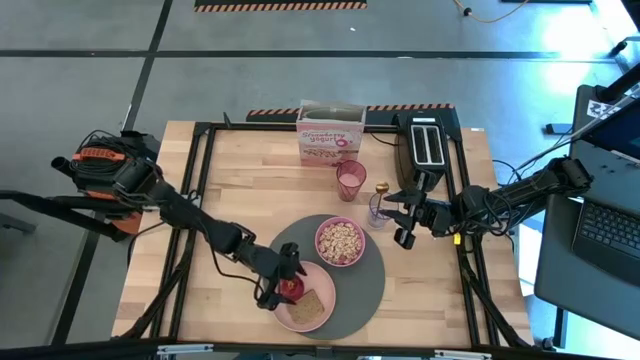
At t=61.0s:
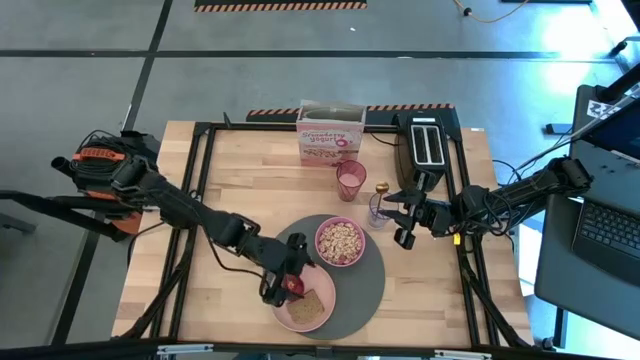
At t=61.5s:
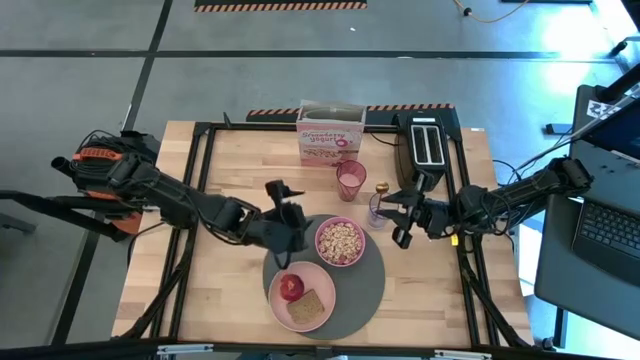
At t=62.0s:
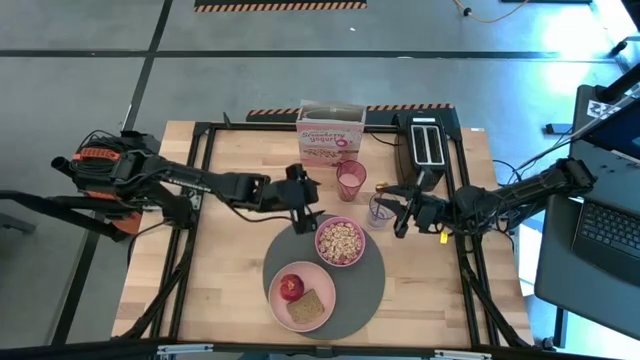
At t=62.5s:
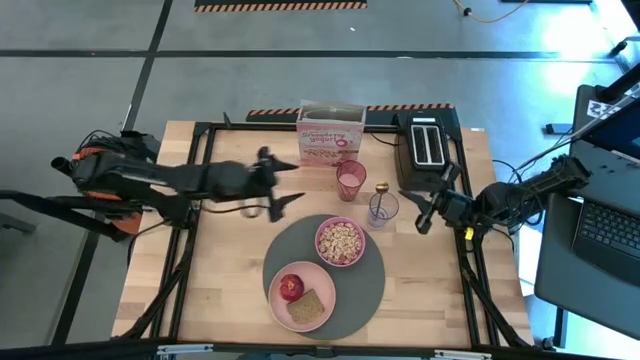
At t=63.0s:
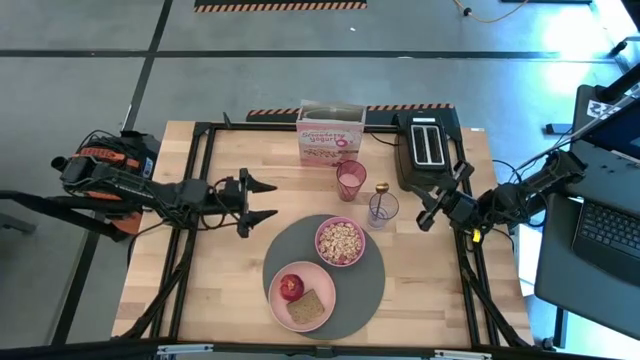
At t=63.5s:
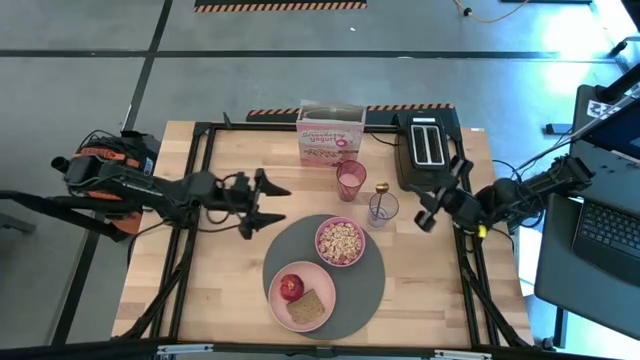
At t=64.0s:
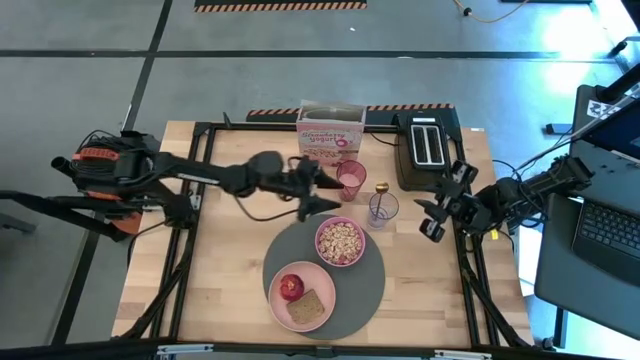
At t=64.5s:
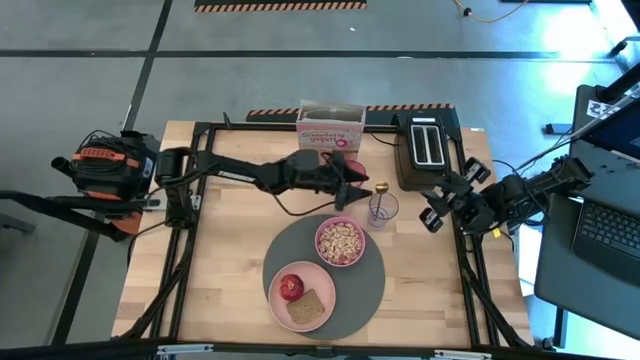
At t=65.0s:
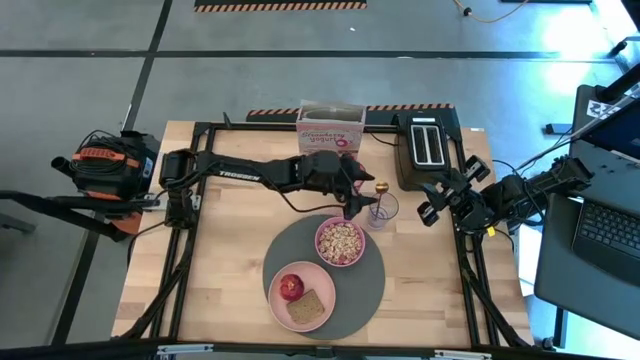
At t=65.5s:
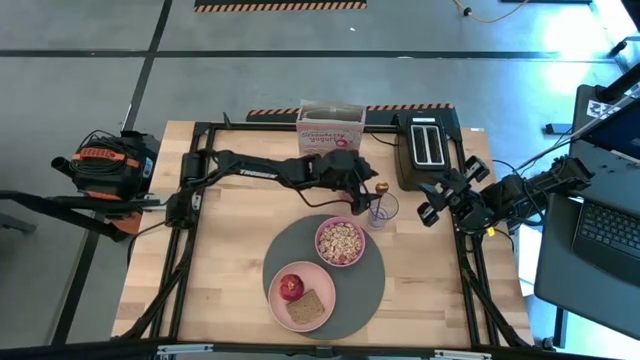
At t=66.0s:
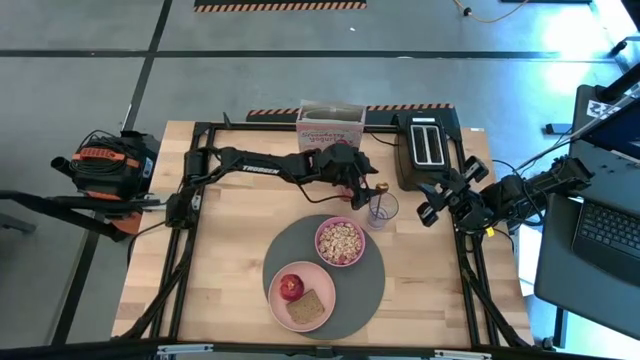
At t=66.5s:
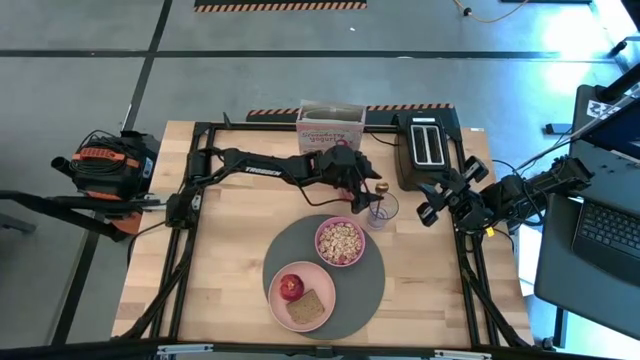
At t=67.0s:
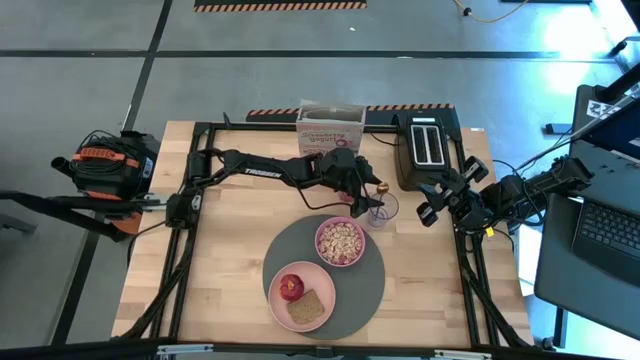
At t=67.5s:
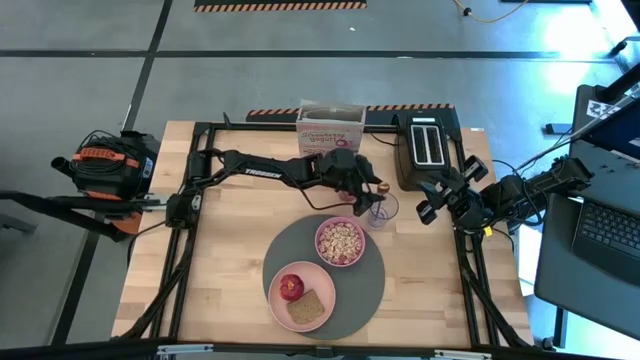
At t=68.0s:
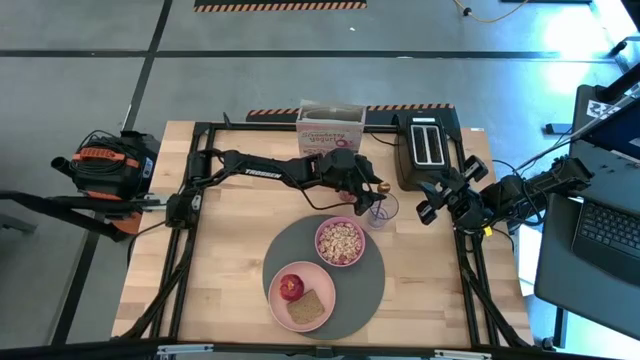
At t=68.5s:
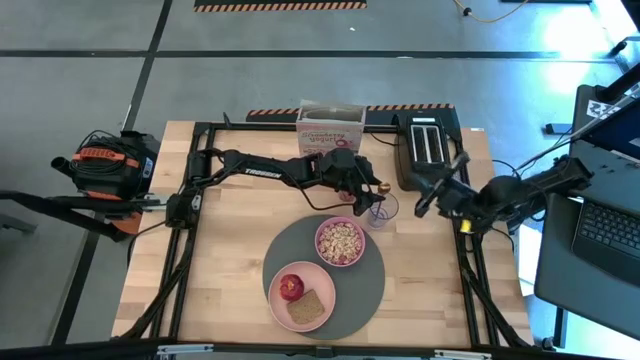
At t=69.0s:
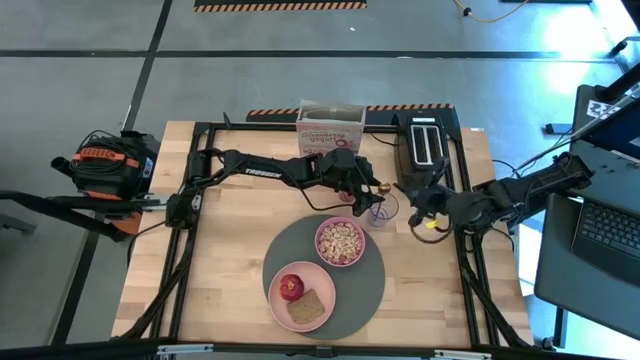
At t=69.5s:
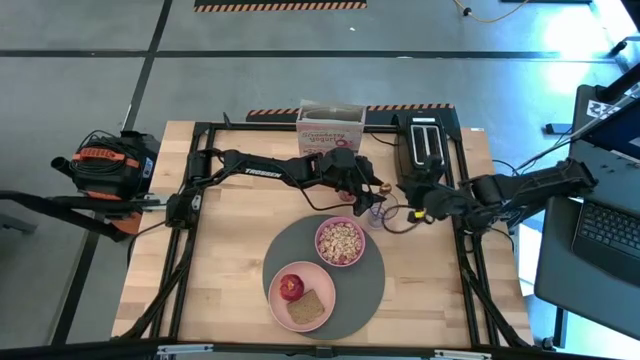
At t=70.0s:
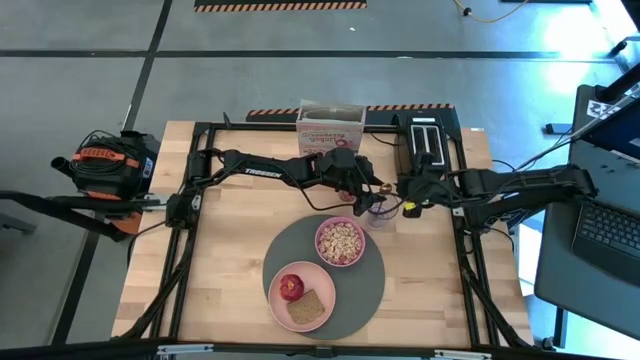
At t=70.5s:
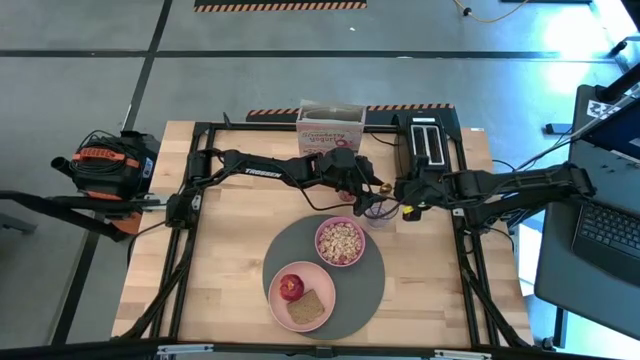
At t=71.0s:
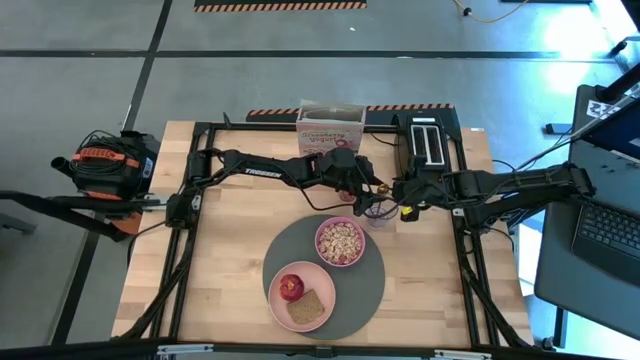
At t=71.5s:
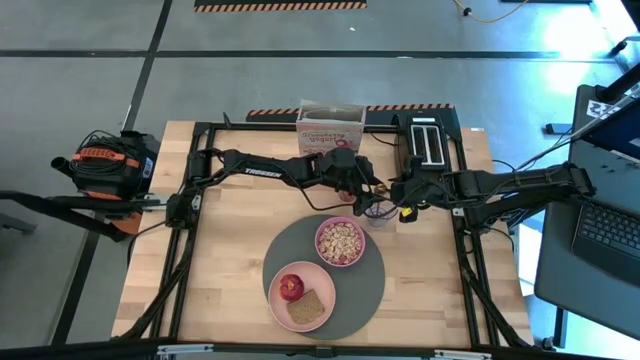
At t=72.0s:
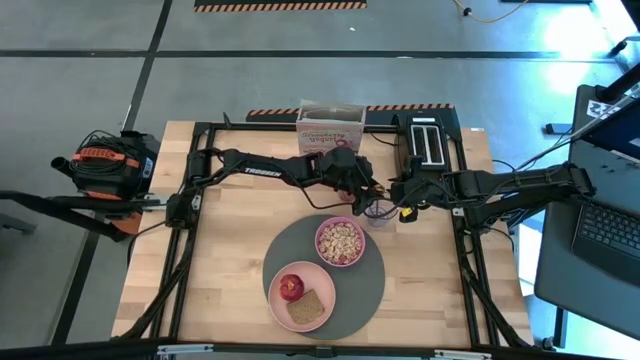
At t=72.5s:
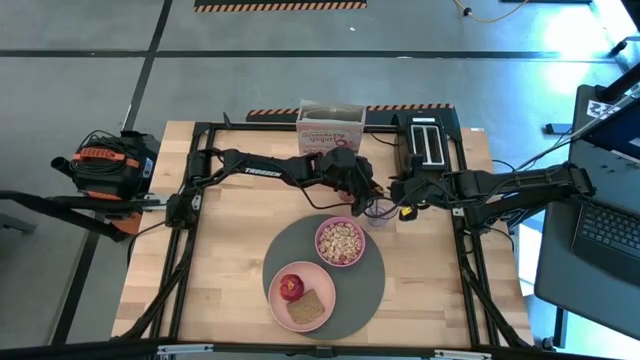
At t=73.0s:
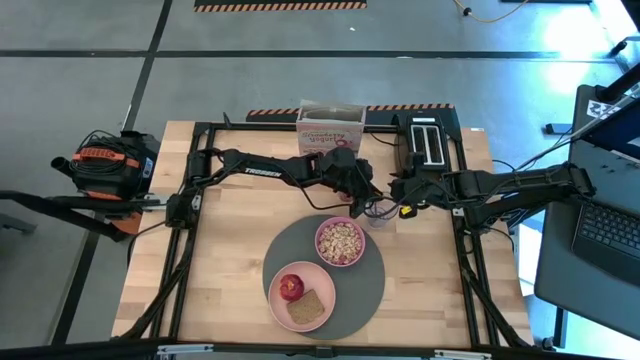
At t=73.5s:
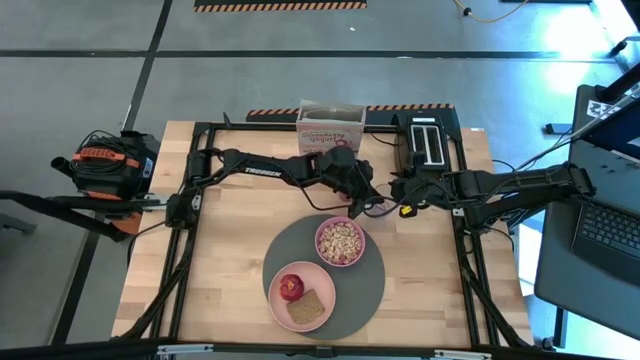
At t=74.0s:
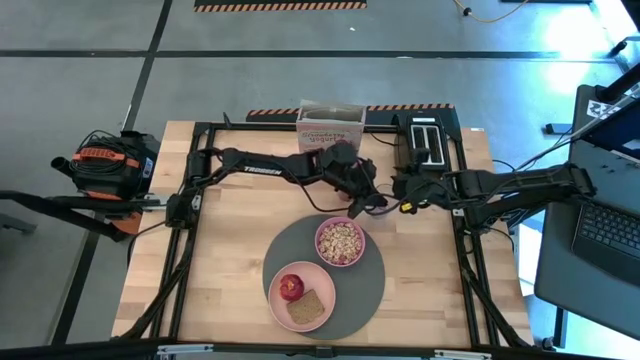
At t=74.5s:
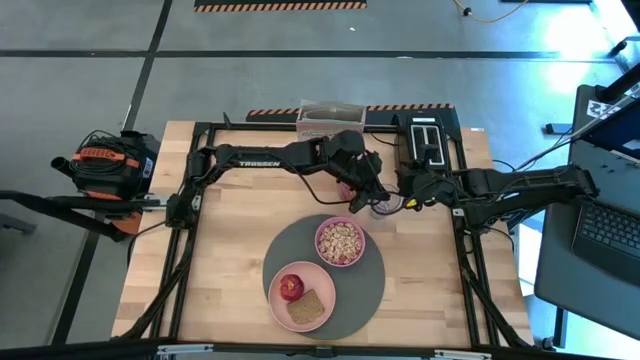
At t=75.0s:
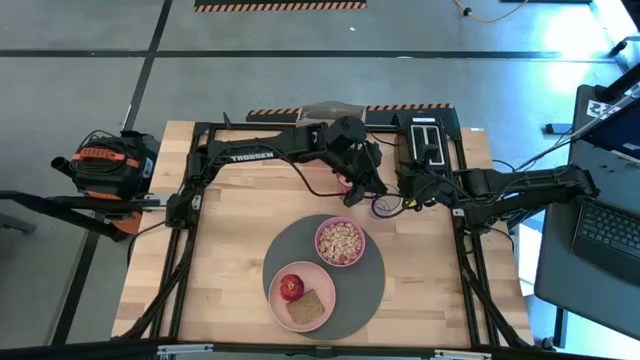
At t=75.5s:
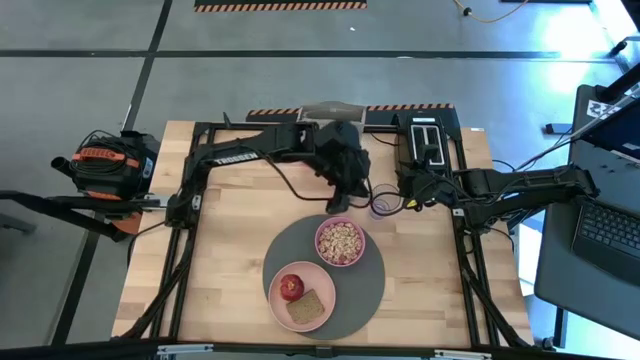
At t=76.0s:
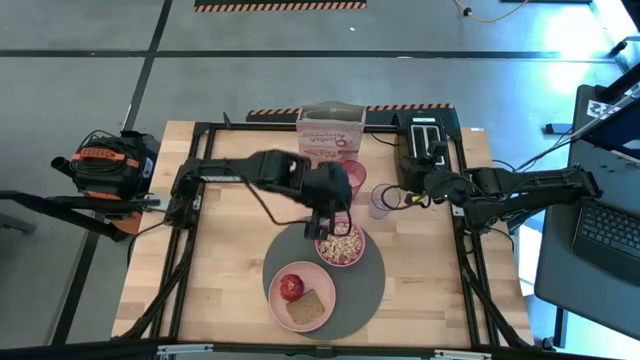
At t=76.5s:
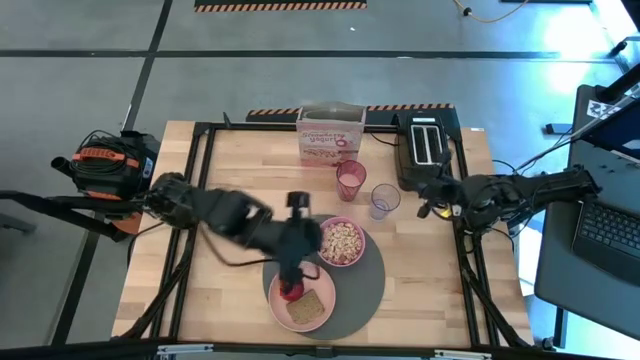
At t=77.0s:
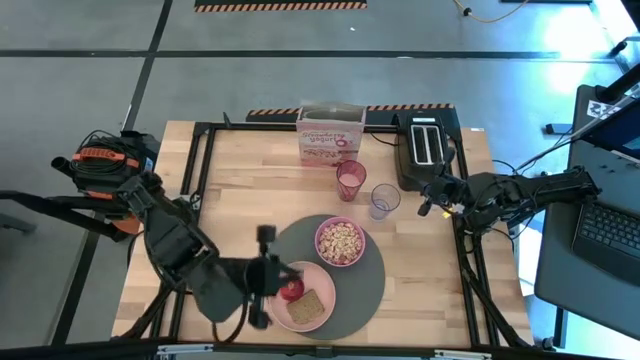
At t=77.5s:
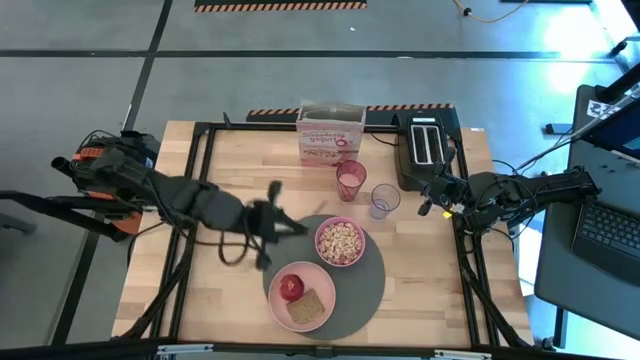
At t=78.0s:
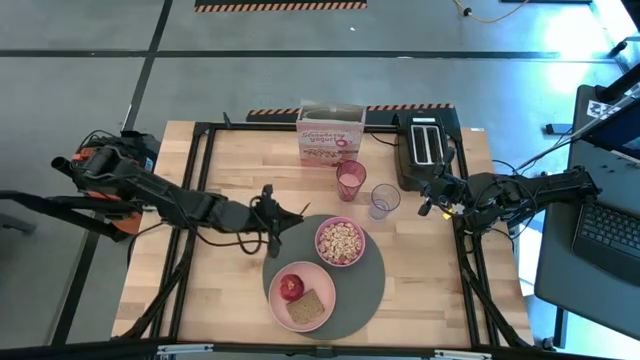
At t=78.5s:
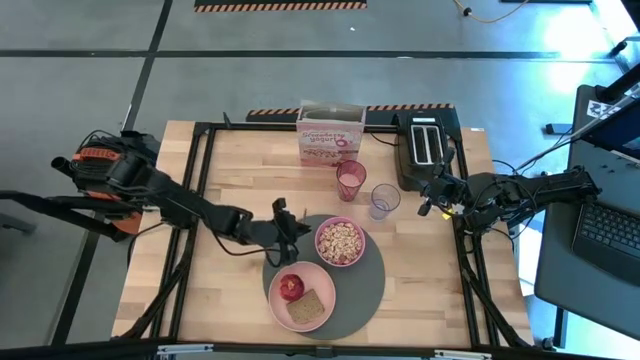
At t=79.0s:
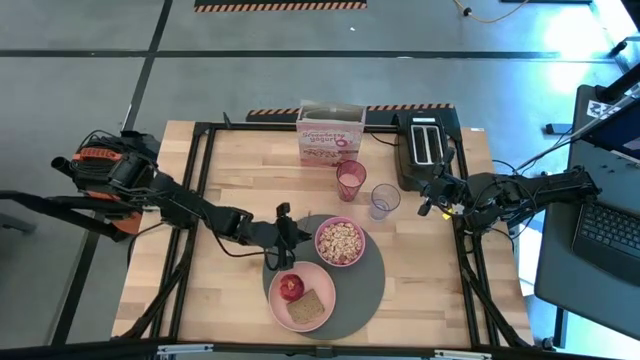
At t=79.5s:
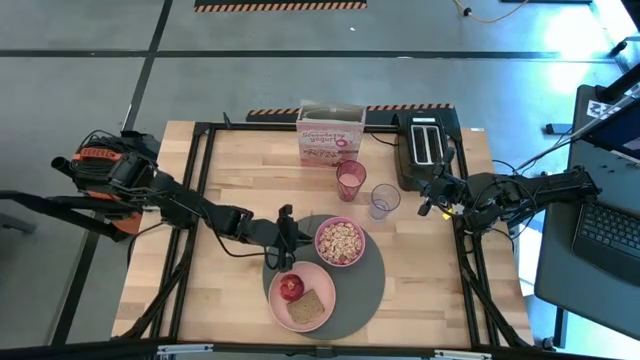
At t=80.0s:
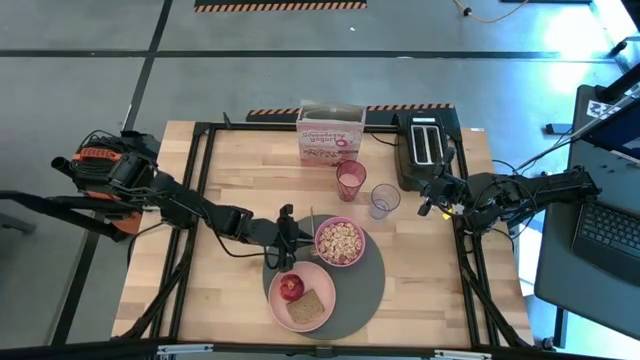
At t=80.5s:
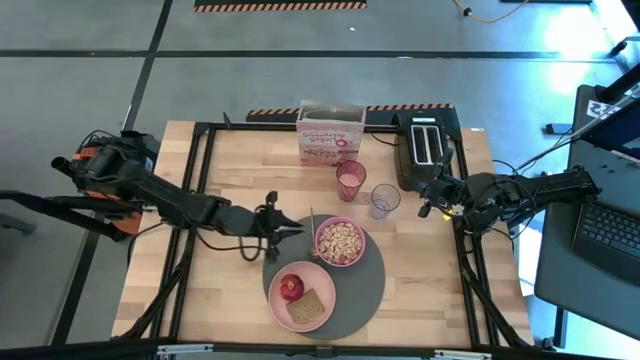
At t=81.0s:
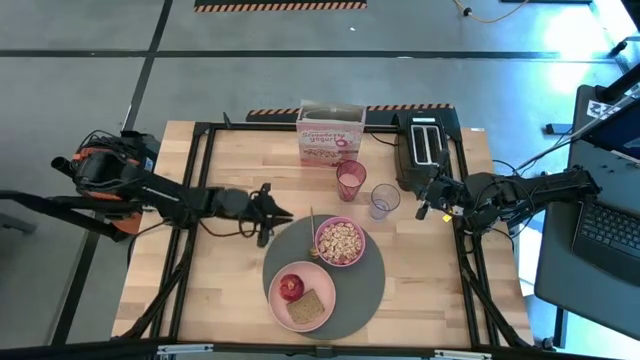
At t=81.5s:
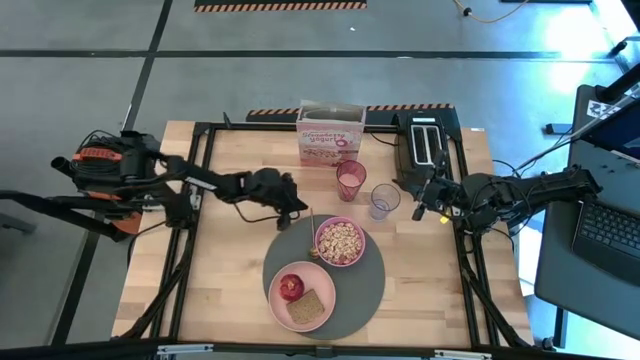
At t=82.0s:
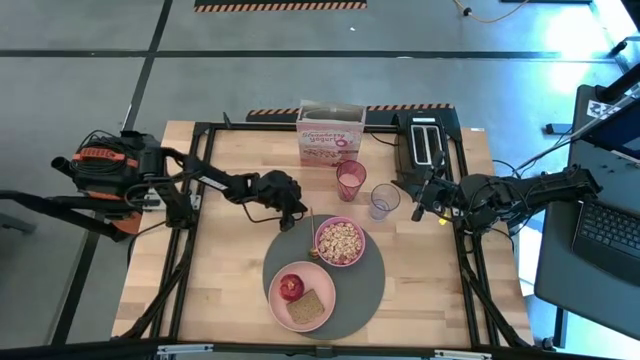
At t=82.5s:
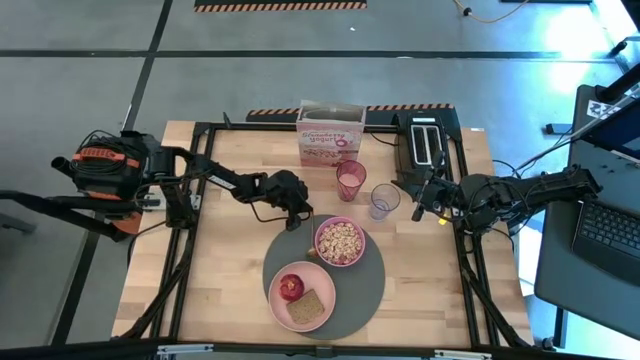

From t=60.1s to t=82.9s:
Task: Arrange a breakfast setting
Put the spoon on the grey placemat to the left of the pink bowl
